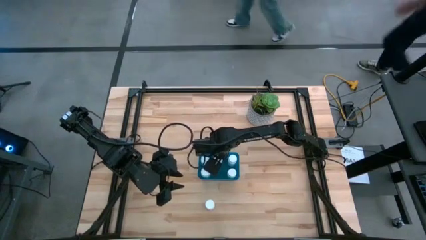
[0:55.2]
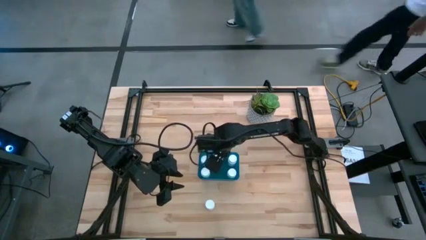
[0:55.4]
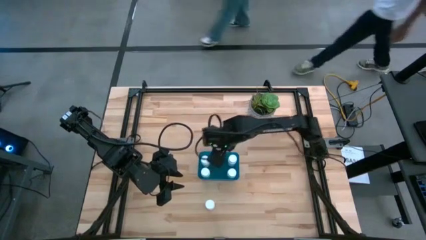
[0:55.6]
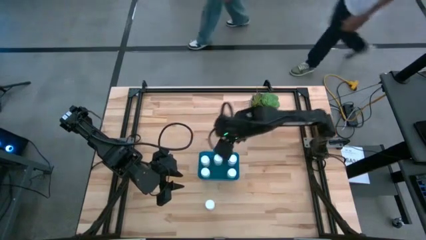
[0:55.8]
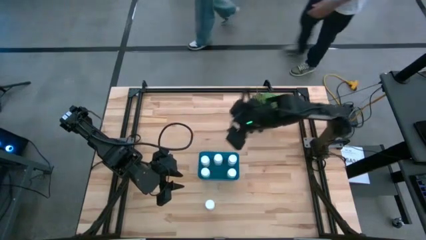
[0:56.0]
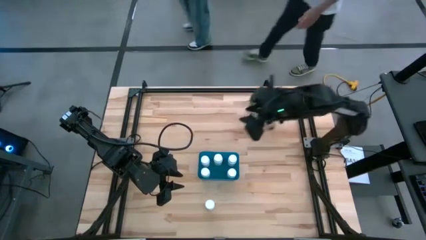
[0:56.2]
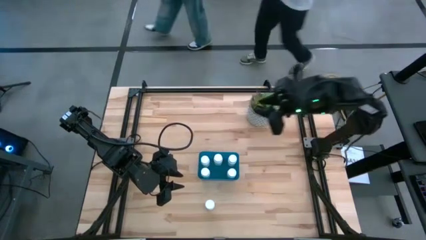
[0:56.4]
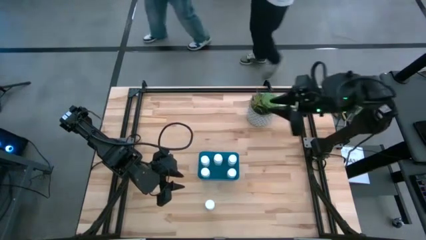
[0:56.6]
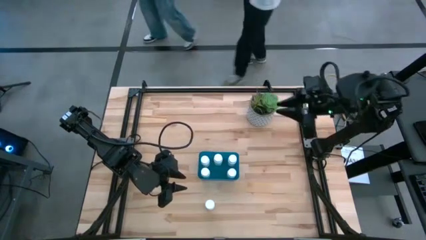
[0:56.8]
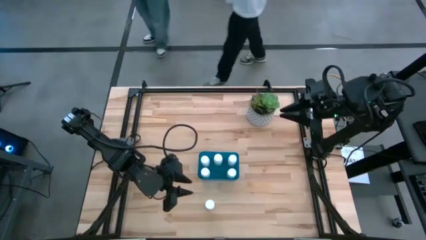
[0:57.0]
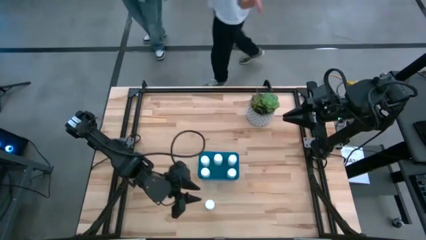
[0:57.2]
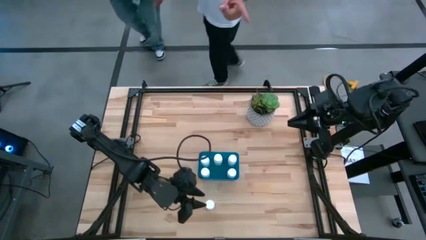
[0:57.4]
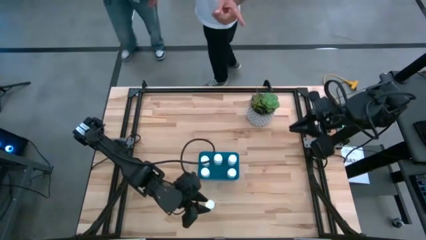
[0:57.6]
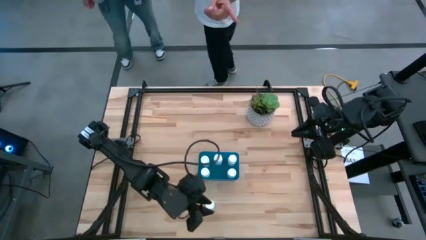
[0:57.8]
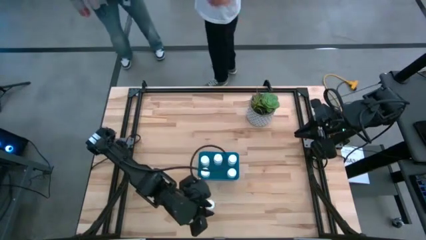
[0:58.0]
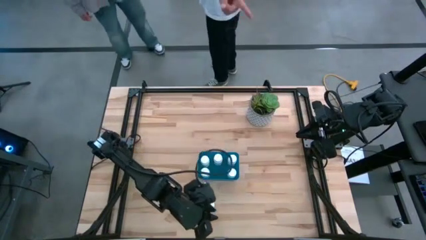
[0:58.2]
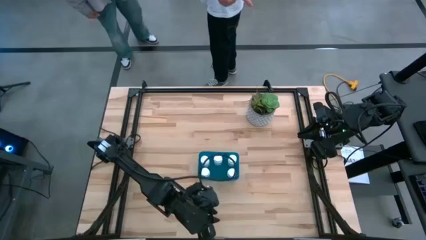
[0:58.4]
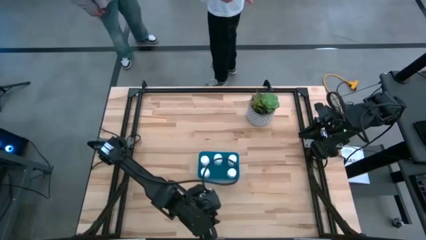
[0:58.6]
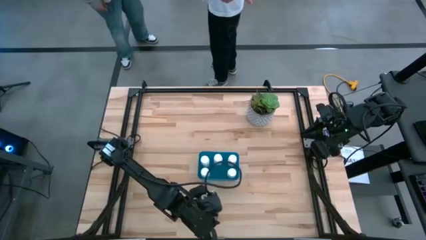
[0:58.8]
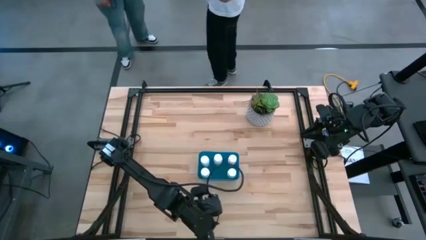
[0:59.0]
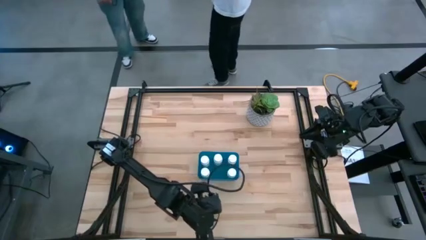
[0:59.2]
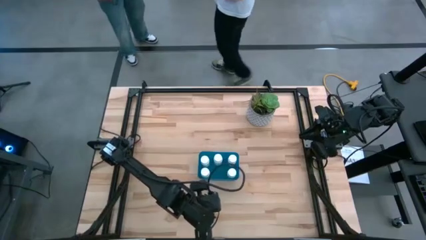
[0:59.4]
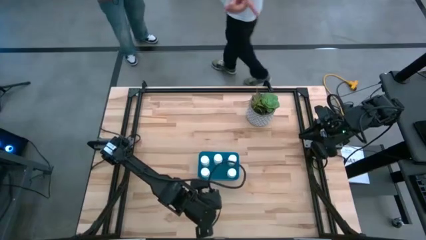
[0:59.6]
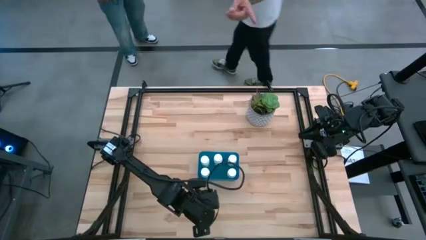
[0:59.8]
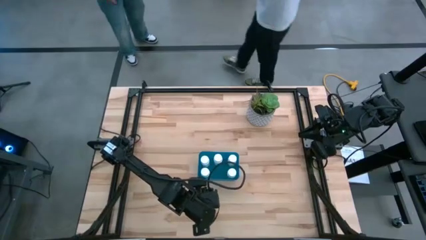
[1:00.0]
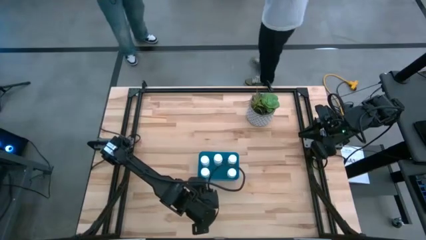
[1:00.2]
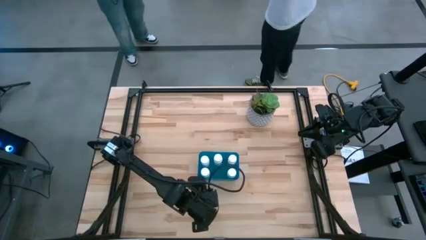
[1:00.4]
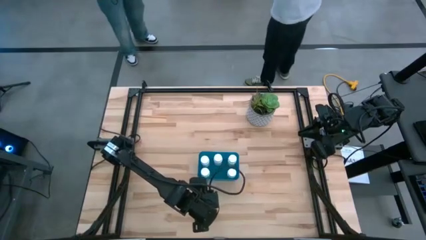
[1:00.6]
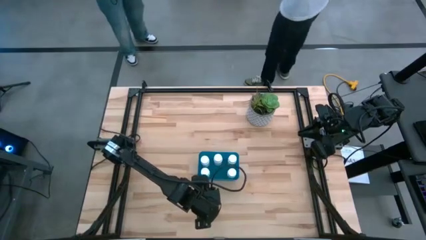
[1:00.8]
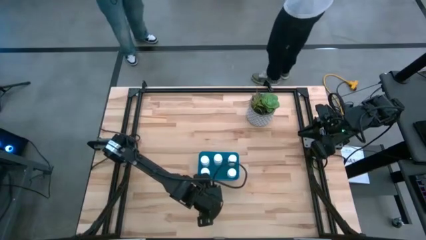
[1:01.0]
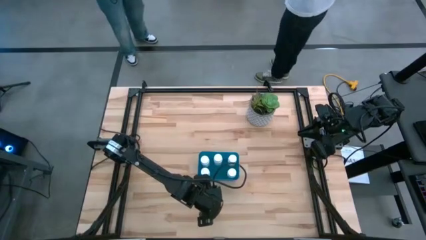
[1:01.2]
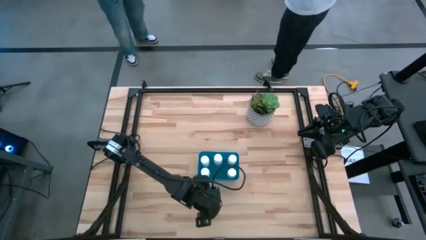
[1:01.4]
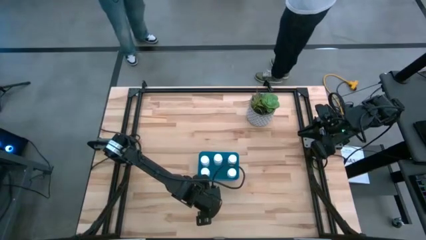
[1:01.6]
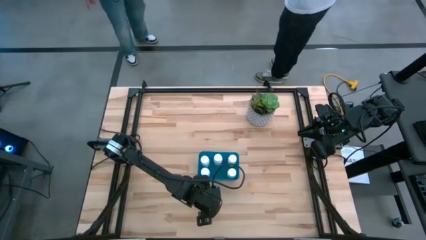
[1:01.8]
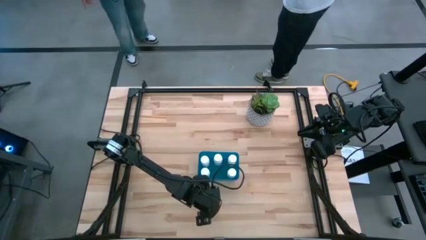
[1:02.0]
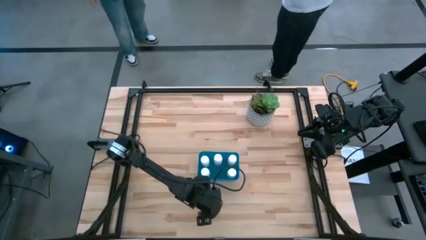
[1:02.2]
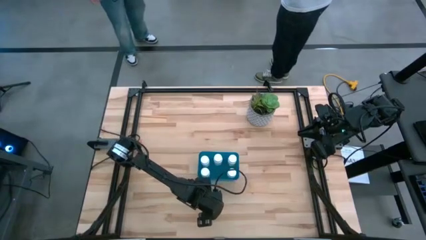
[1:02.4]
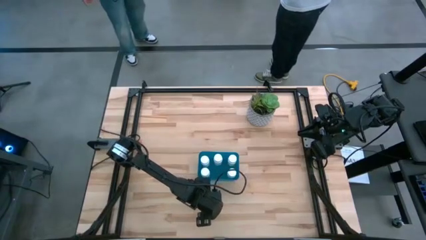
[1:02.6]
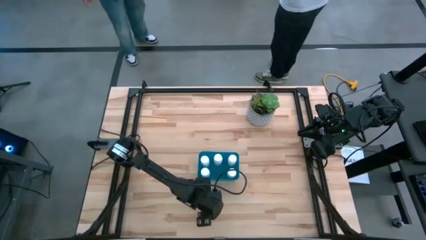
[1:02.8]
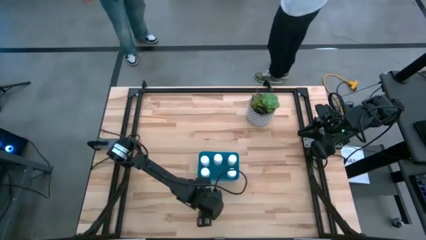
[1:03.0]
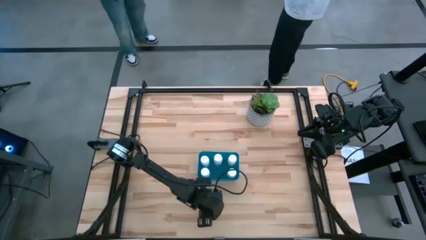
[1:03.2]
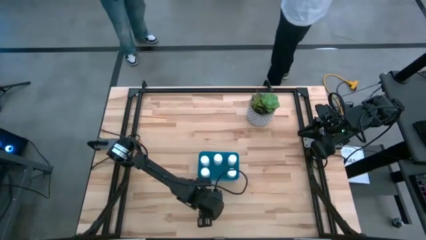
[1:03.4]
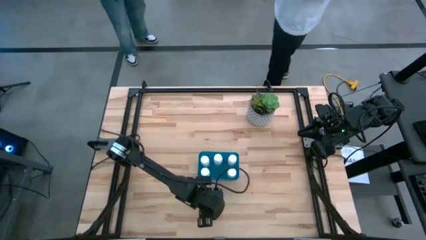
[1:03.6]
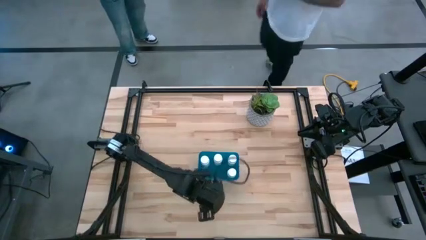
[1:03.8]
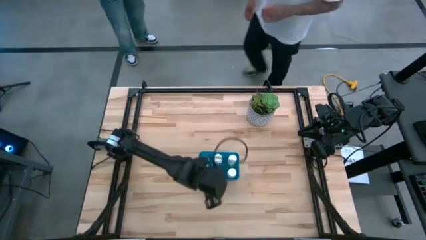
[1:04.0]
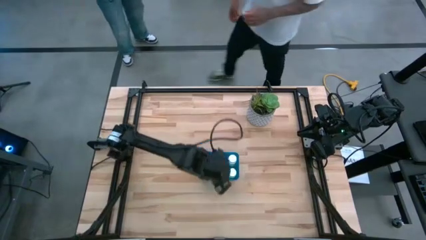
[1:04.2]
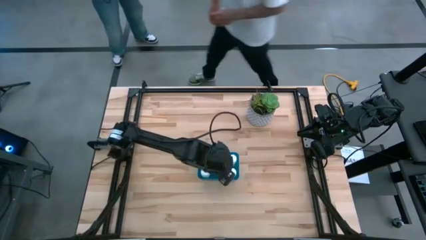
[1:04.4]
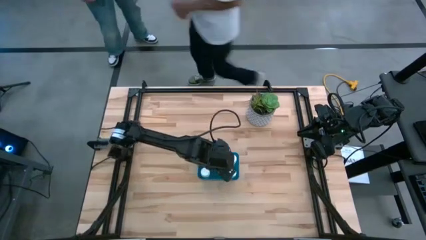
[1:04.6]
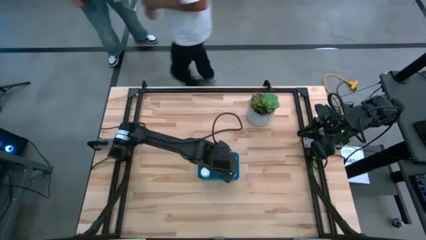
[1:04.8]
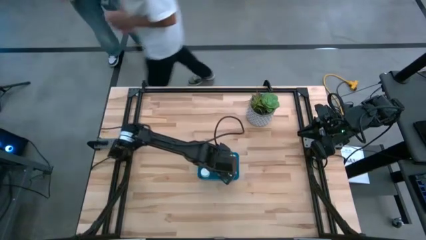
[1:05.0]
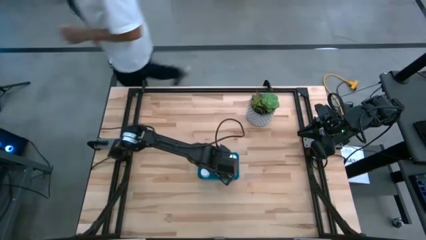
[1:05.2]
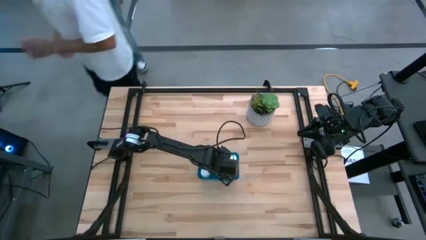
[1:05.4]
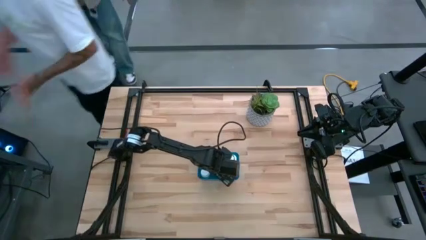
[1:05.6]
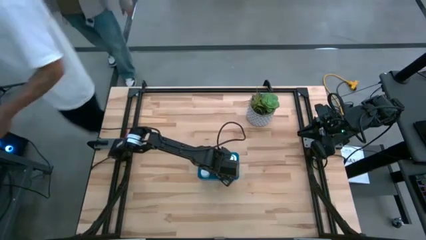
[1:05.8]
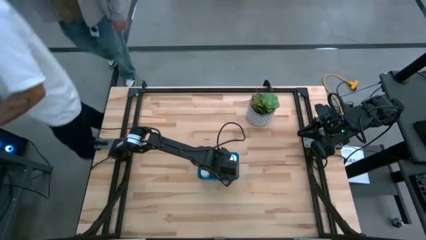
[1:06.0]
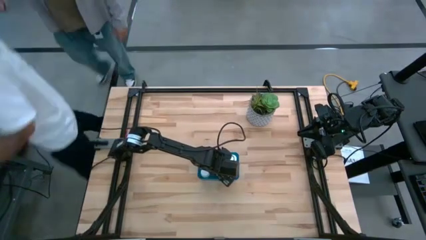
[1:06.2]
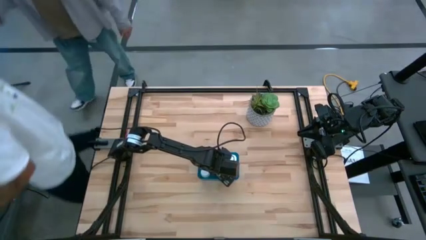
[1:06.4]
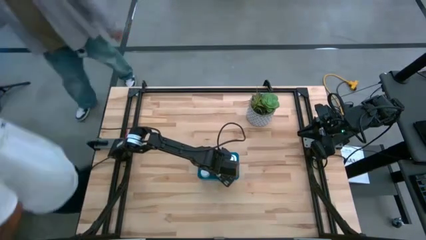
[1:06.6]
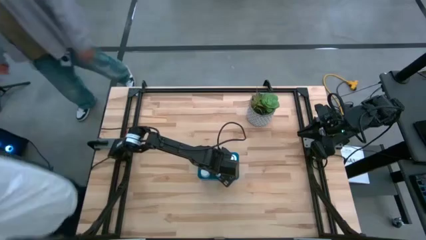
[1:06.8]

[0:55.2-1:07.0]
Task: Pick and place pill bottles into a basket
Put the white pill bottle into the blue bin
